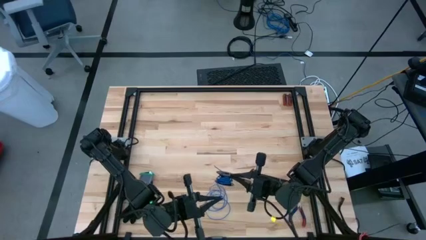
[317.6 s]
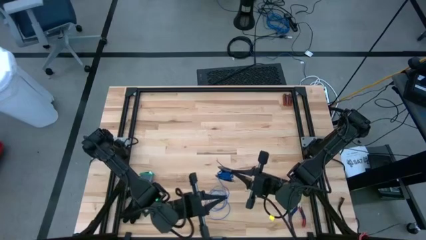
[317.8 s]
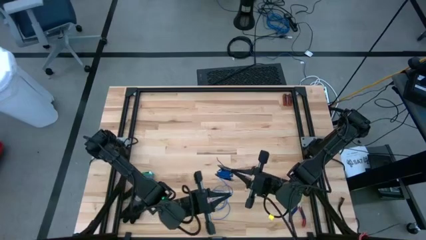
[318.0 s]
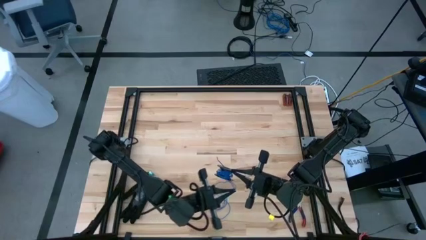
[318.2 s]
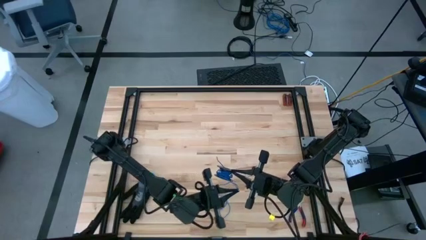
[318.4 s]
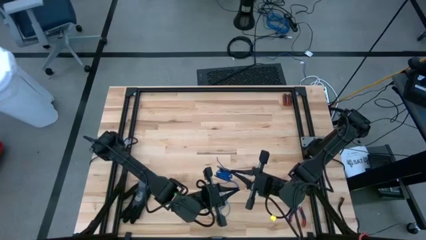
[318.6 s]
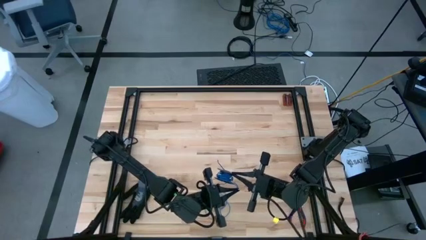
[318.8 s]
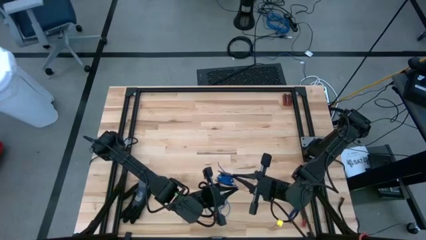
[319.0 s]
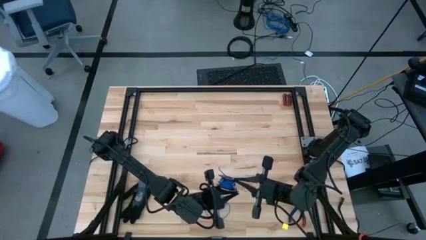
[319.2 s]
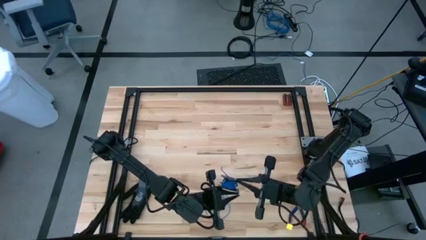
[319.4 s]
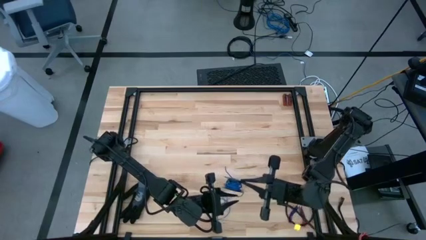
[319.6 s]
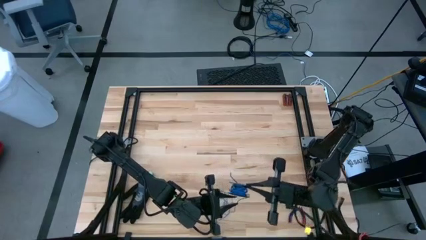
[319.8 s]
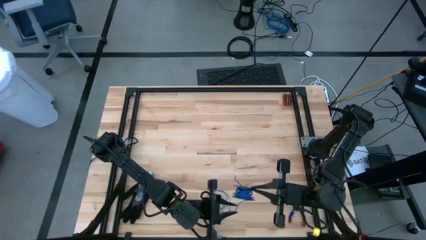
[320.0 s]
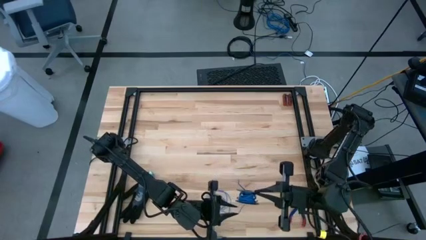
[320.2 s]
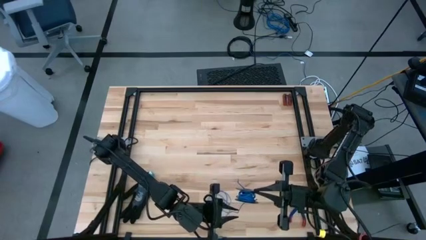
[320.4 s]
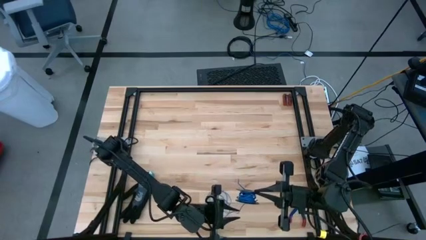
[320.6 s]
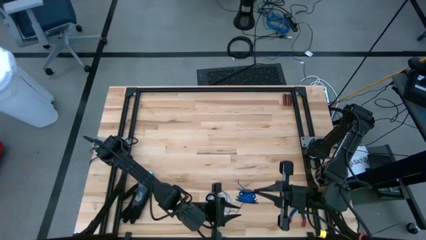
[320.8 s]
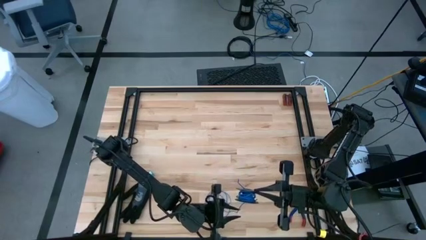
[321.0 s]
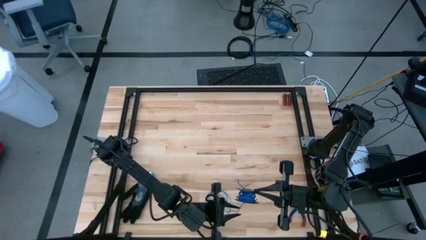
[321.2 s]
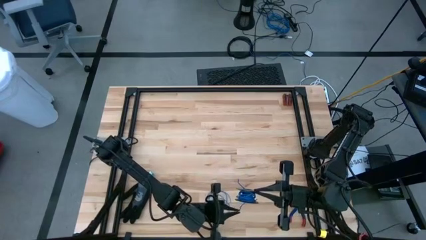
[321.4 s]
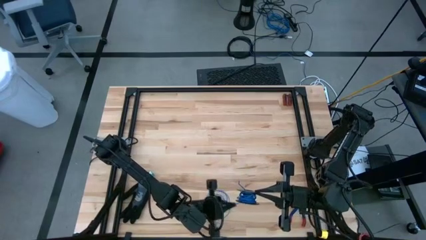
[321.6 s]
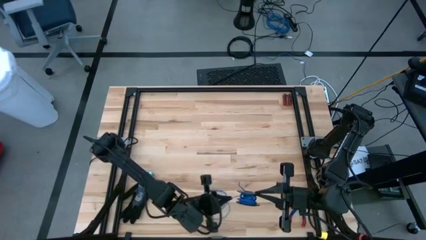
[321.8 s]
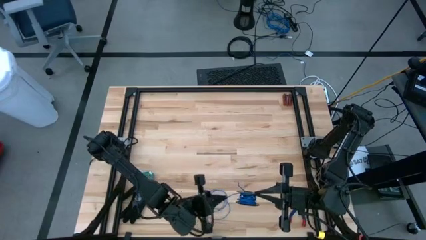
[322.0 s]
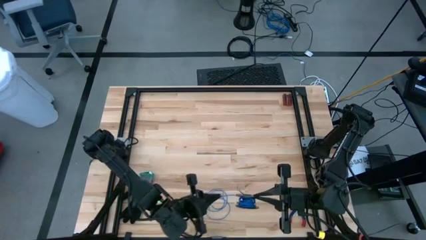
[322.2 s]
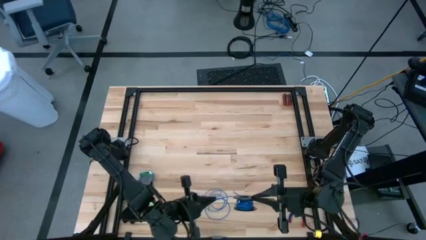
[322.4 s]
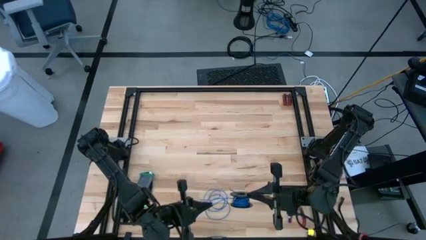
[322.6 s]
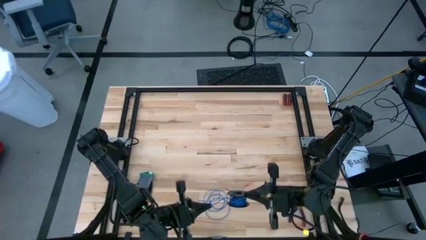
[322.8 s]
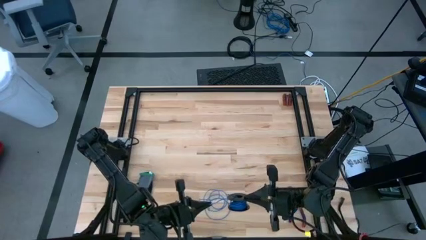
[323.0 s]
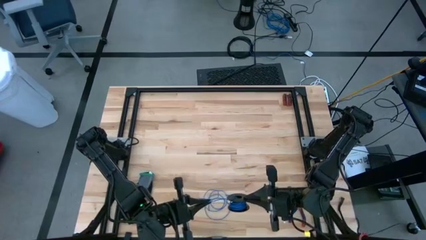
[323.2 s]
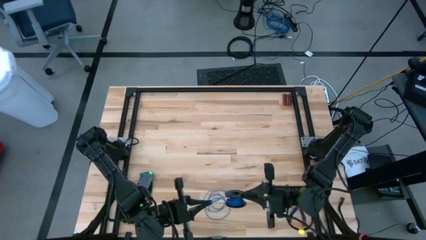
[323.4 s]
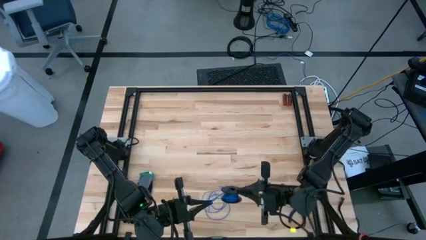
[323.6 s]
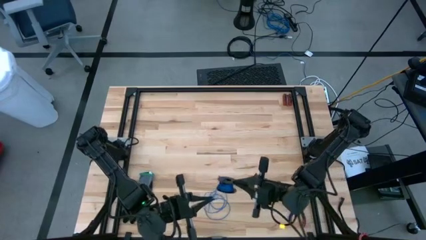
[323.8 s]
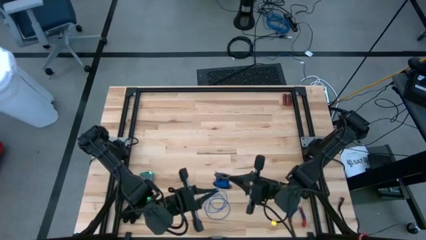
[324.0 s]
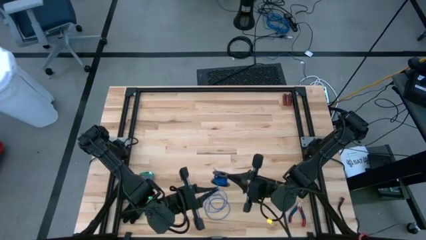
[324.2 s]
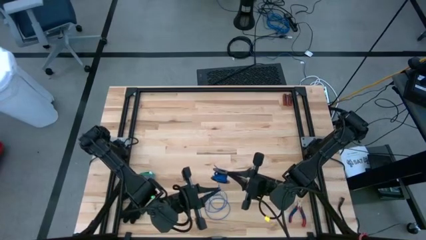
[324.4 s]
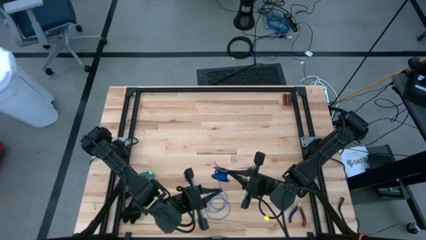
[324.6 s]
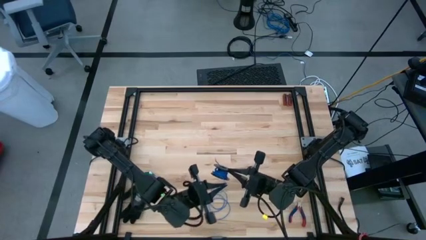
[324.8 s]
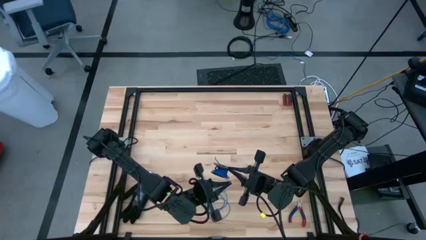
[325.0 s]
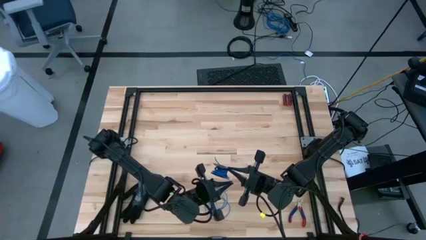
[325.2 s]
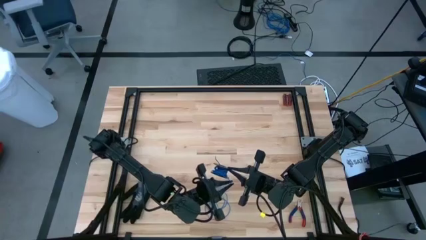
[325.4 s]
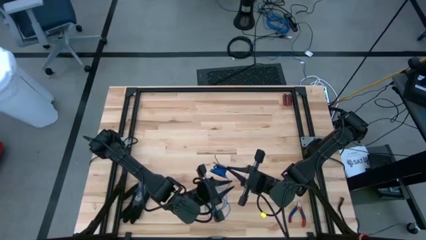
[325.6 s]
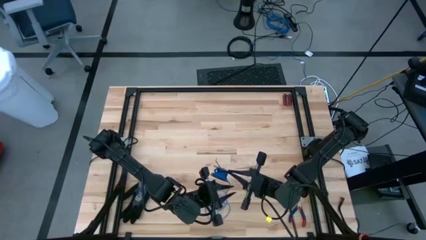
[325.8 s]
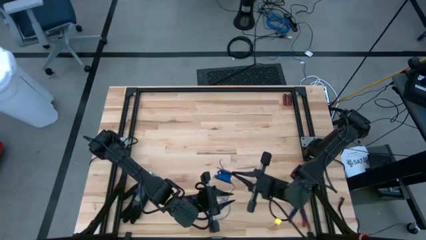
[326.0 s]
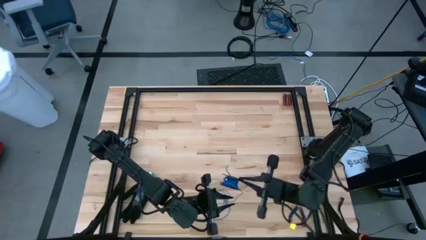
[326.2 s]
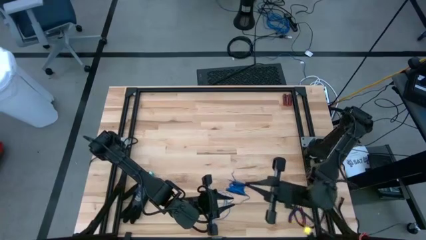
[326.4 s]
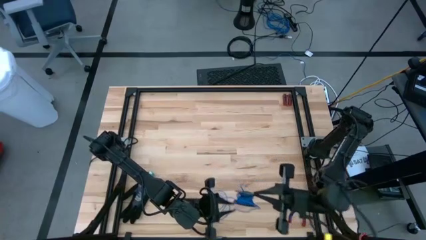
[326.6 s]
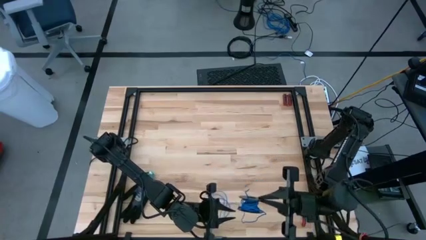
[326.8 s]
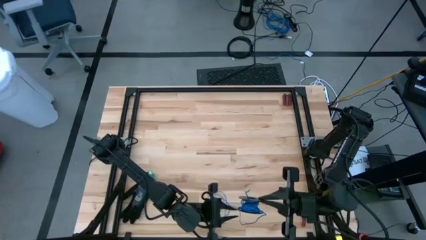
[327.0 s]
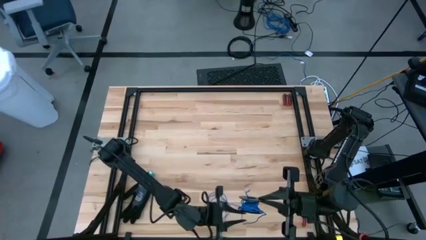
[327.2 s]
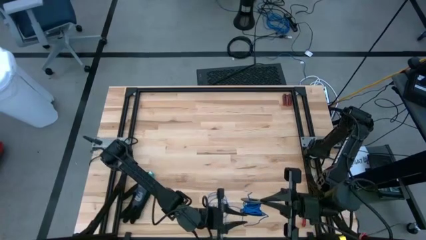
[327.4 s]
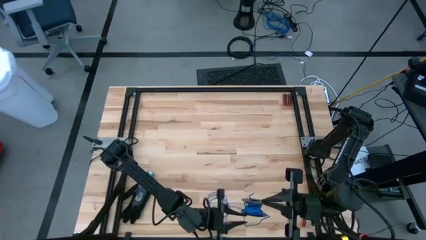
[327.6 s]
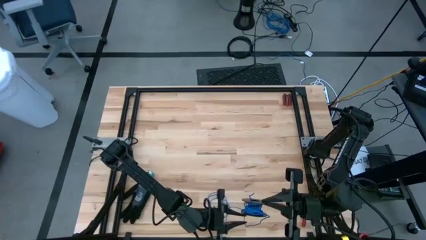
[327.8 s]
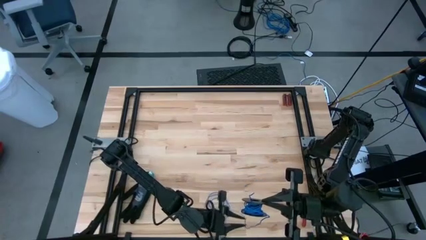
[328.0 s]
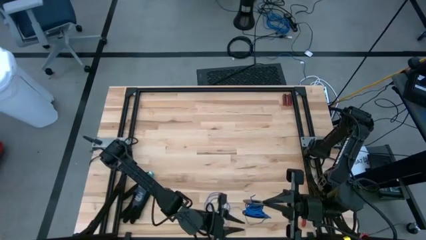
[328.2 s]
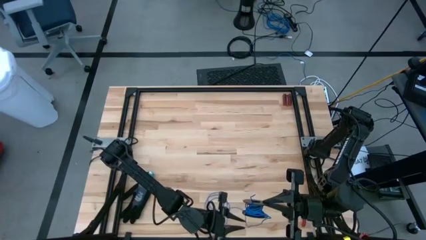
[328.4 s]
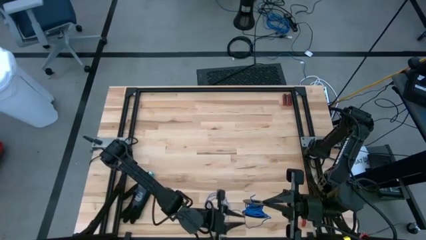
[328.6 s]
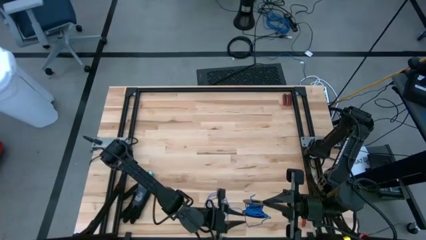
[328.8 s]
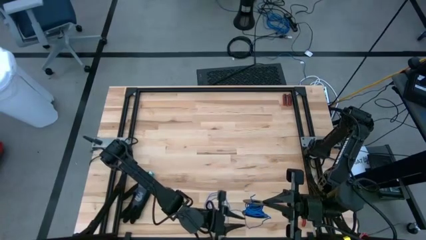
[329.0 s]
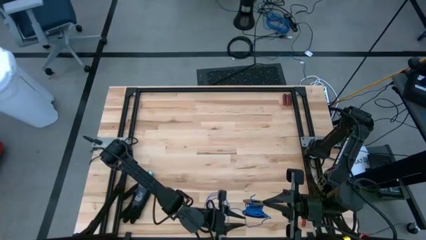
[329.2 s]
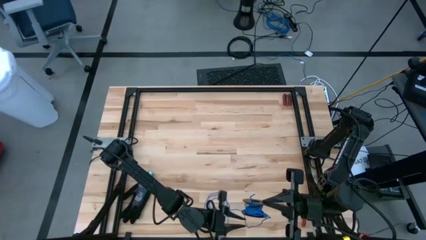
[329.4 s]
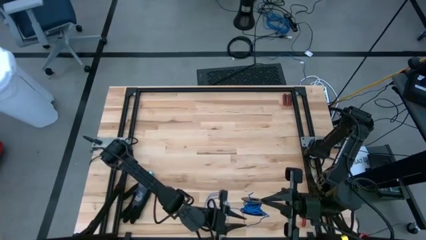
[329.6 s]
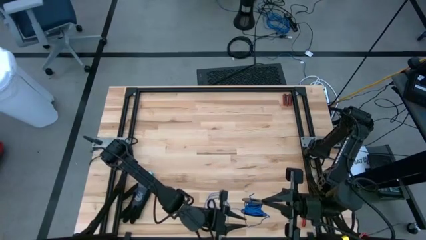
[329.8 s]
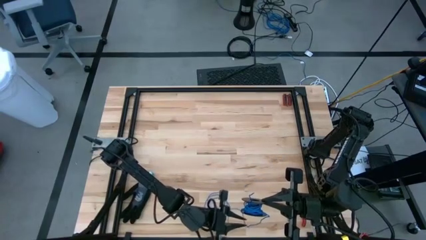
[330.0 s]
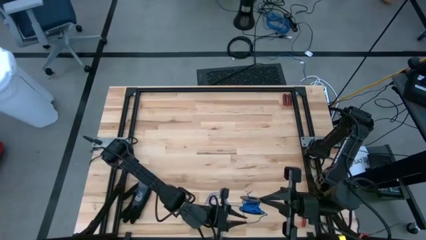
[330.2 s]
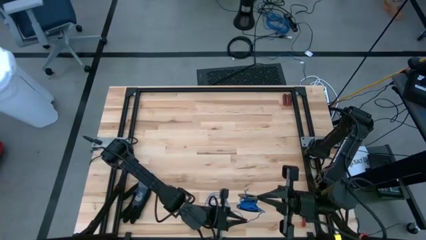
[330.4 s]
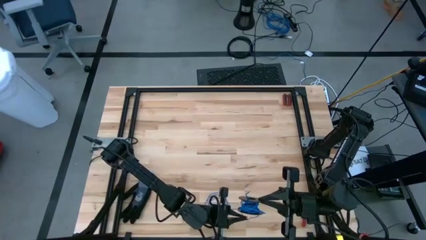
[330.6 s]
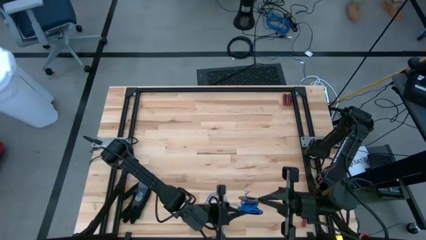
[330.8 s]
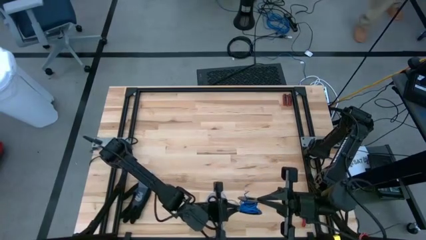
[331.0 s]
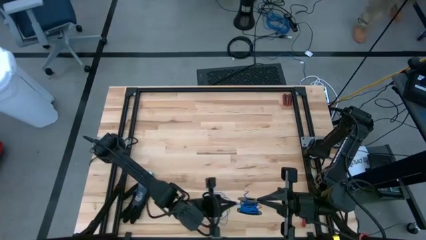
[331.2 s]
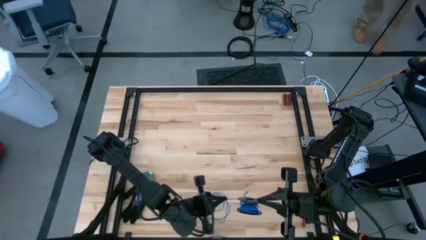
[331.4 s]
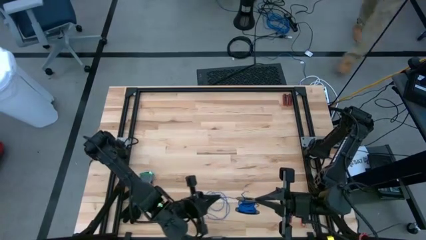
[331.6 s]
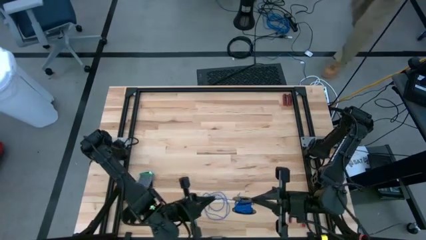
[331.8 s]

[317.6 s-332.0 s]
Task: Coil cords
Coil the blue wire onto the spool

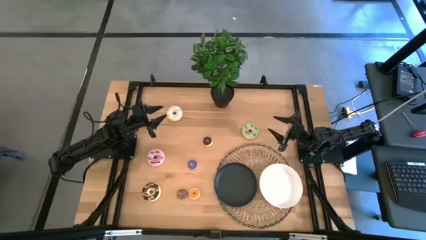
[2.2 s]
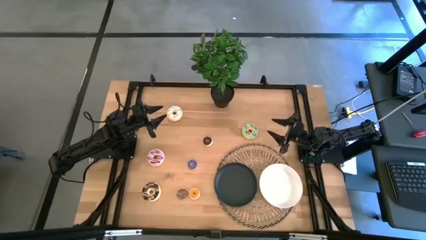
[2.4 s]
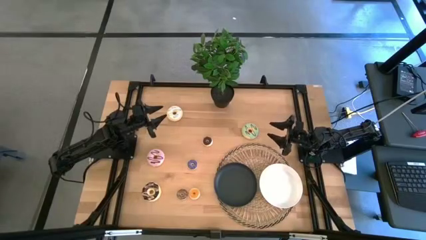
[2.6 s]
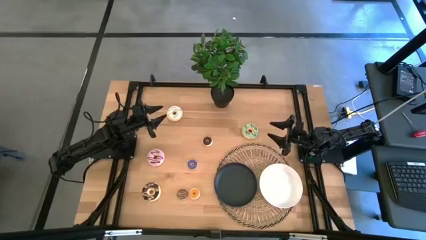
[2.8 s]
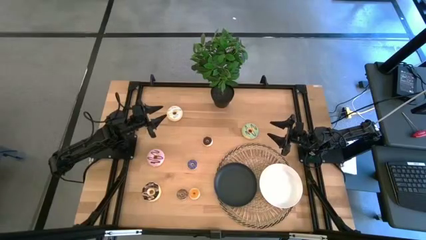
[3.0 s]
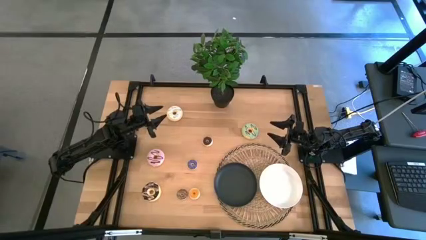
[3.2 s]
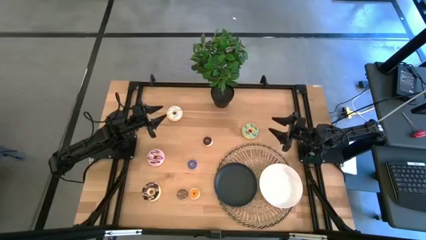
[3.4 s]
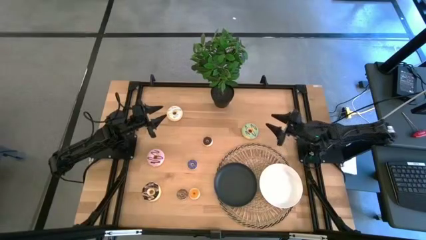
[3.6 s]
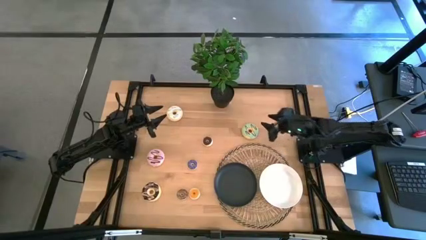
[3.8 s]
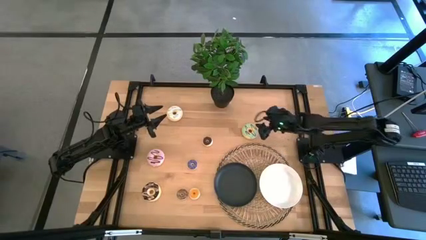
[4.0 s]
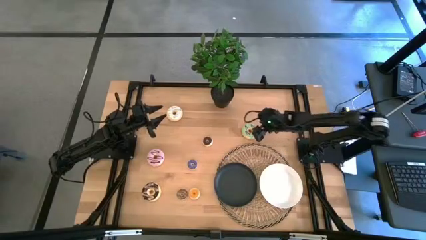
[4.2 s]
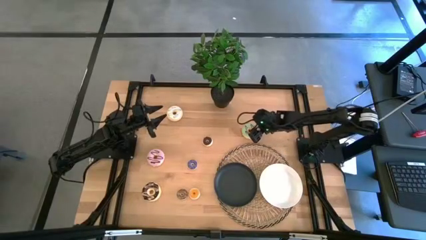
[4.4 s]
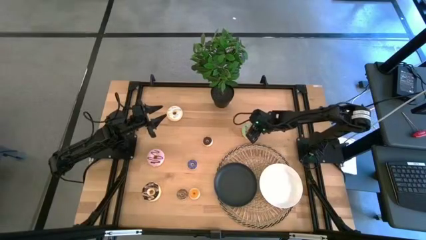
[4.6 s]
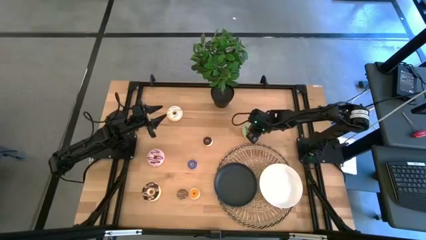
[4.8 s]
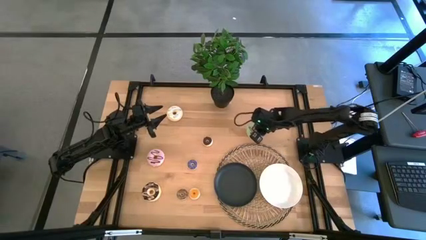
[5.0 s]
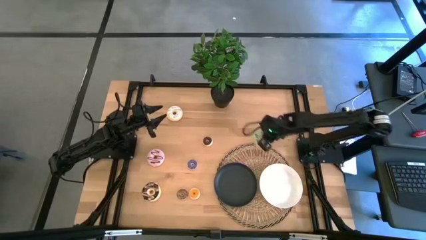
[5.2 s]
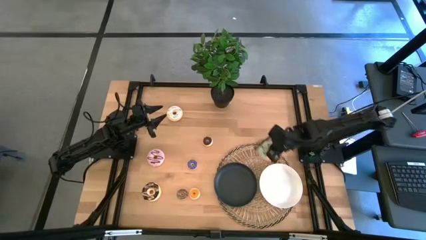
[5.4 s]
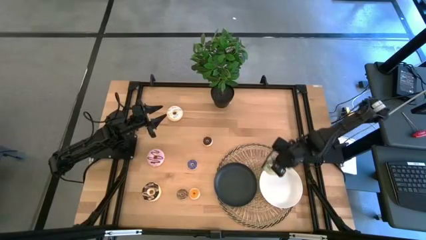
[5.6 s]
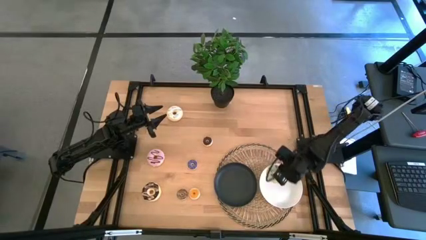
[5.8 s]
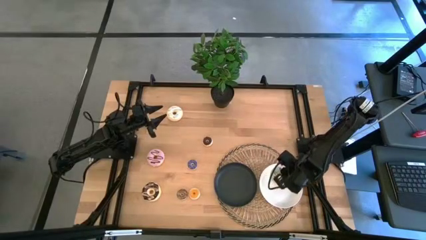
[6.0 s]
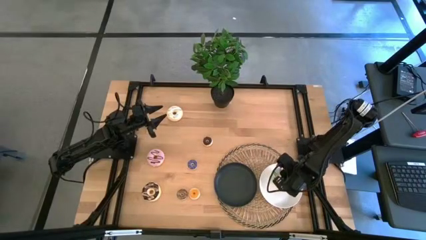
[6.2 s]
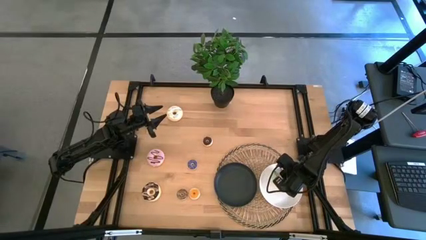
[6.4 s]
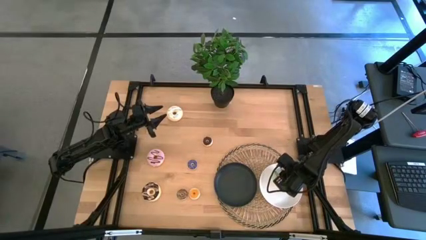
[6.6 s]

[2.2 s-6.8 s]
Task: Pick & Place donuts
Put the big light blue donut on the white plate
